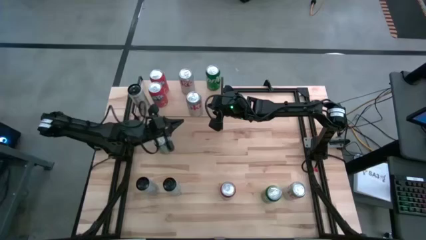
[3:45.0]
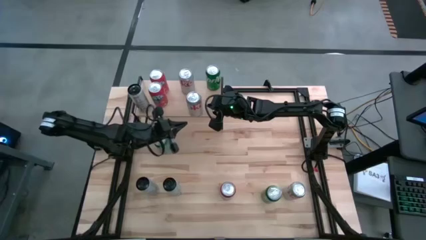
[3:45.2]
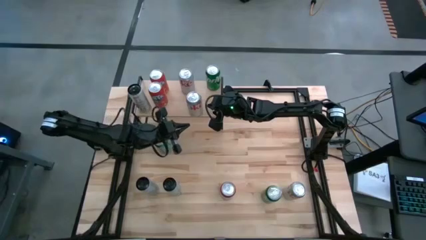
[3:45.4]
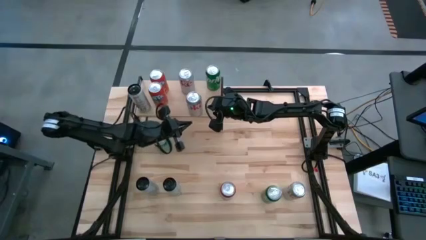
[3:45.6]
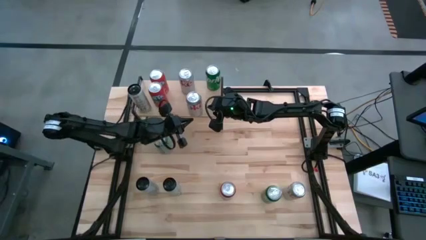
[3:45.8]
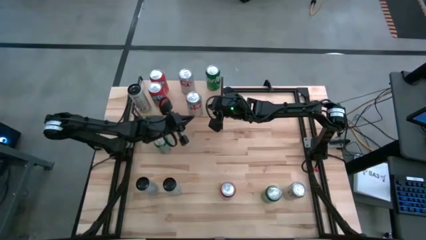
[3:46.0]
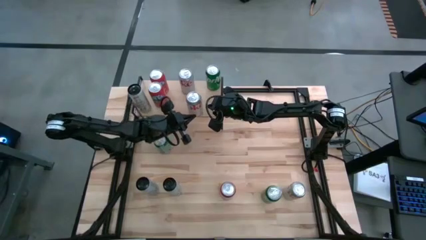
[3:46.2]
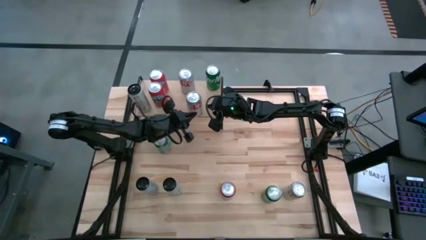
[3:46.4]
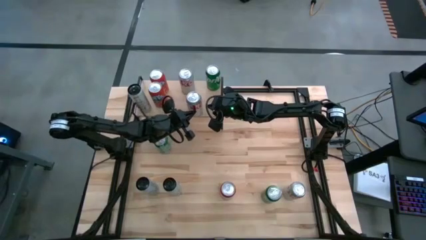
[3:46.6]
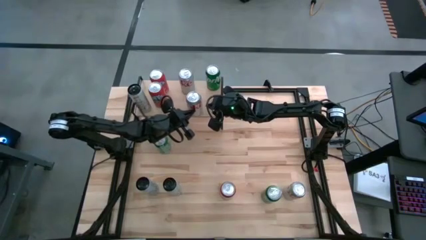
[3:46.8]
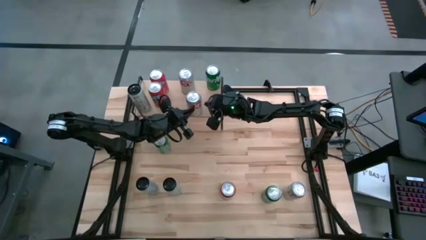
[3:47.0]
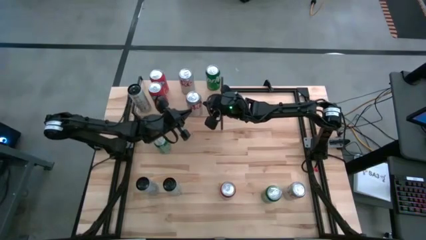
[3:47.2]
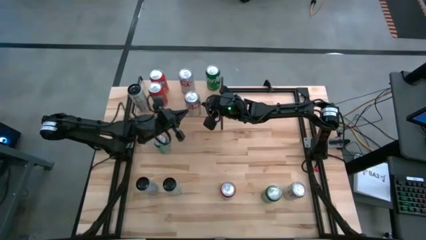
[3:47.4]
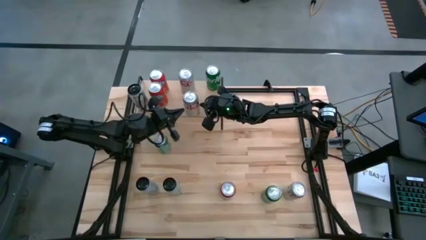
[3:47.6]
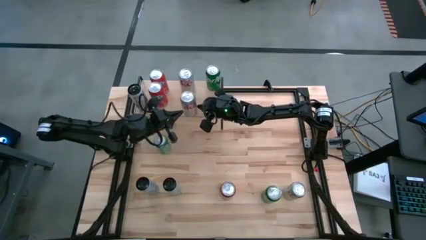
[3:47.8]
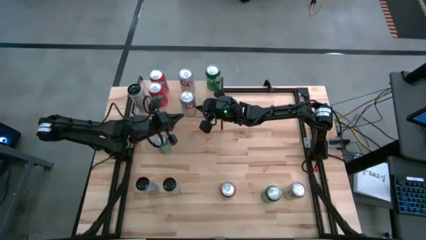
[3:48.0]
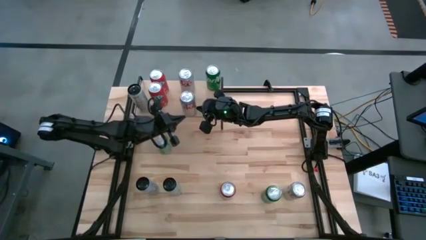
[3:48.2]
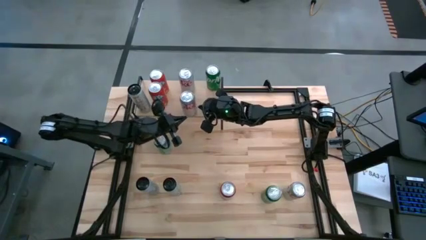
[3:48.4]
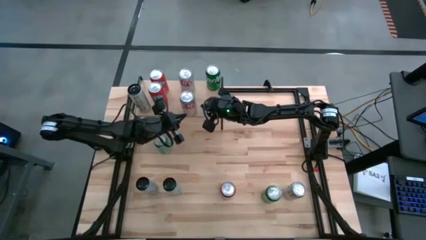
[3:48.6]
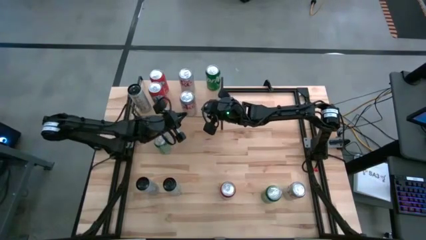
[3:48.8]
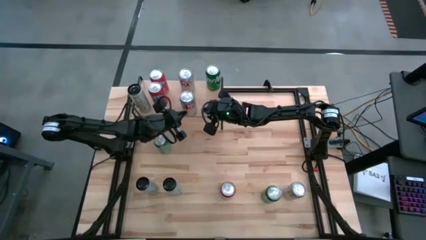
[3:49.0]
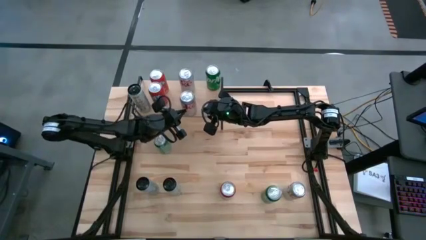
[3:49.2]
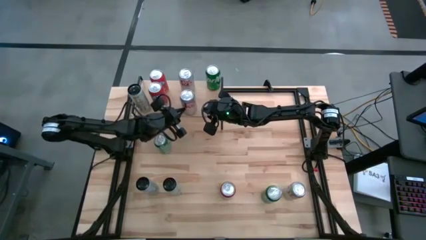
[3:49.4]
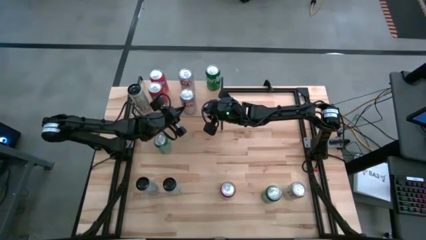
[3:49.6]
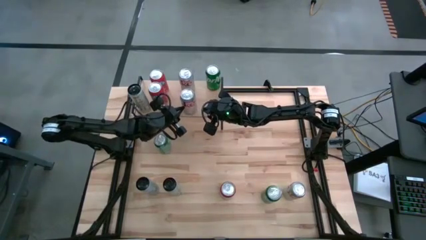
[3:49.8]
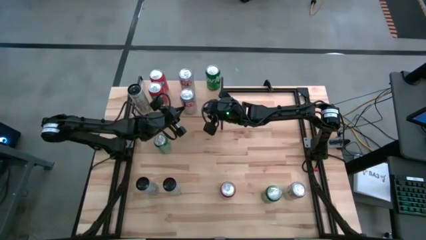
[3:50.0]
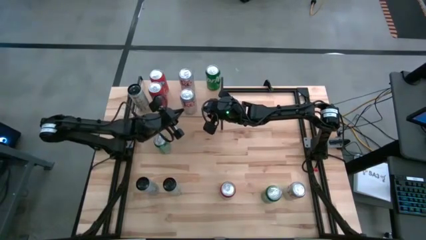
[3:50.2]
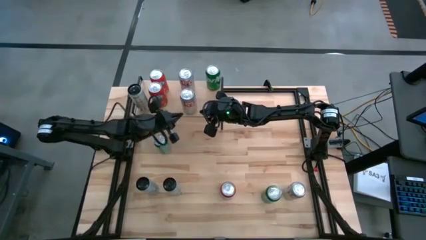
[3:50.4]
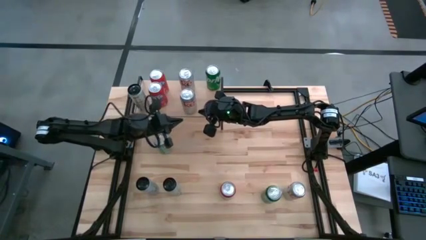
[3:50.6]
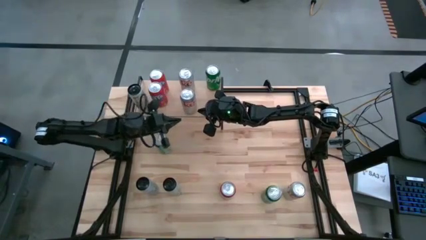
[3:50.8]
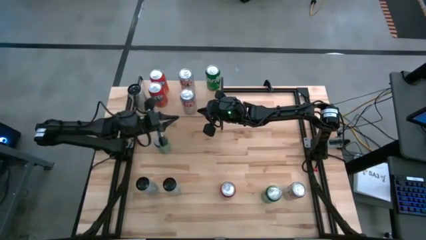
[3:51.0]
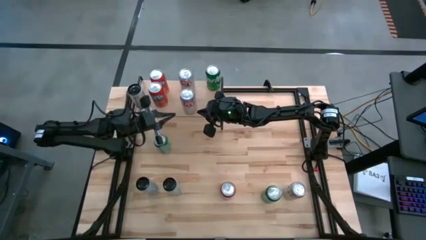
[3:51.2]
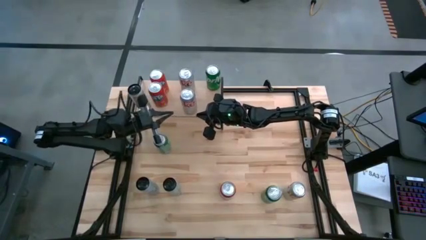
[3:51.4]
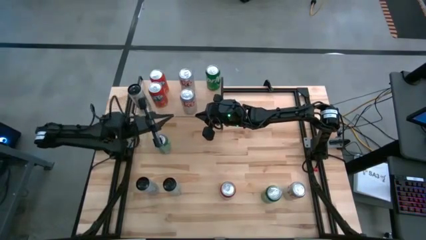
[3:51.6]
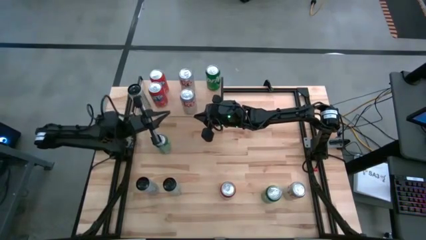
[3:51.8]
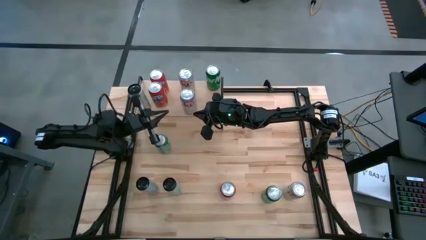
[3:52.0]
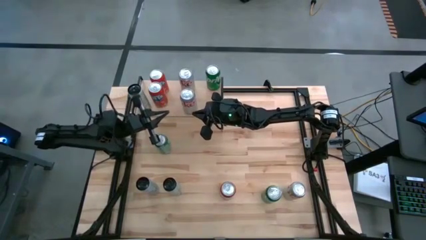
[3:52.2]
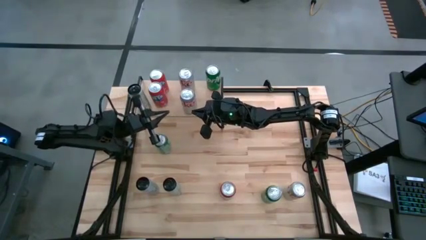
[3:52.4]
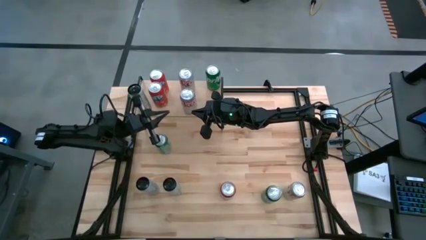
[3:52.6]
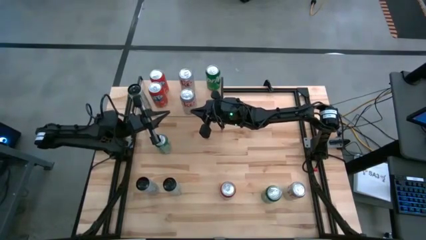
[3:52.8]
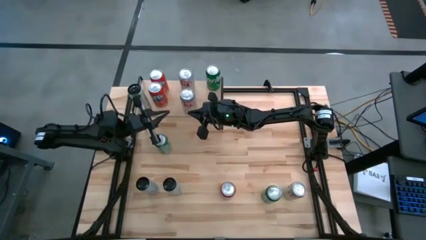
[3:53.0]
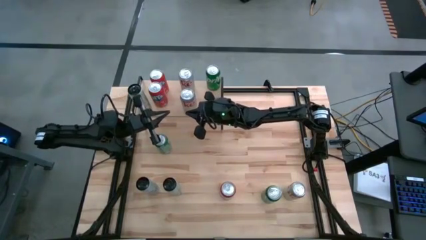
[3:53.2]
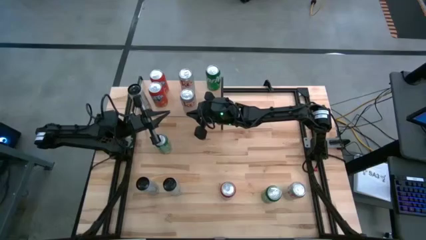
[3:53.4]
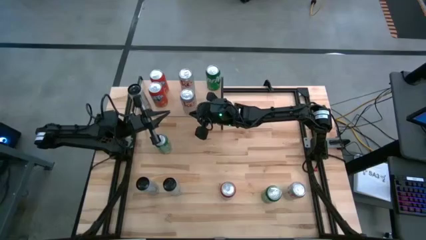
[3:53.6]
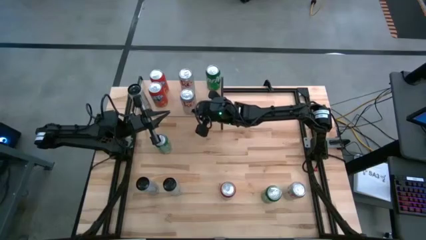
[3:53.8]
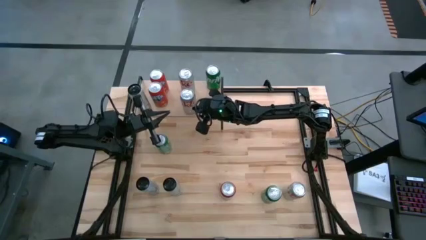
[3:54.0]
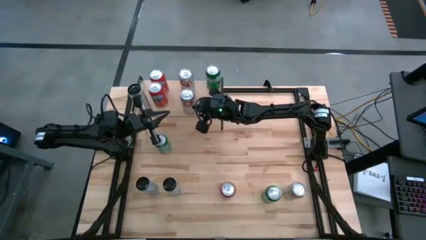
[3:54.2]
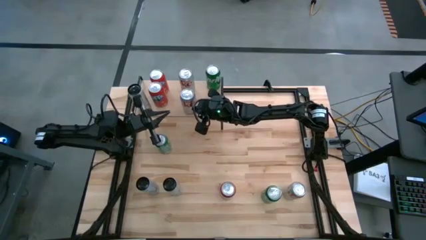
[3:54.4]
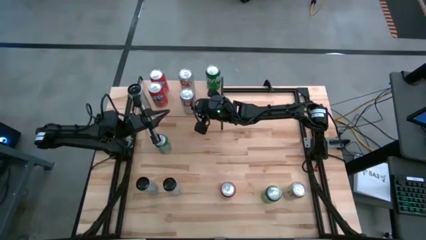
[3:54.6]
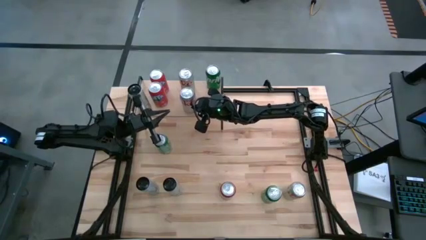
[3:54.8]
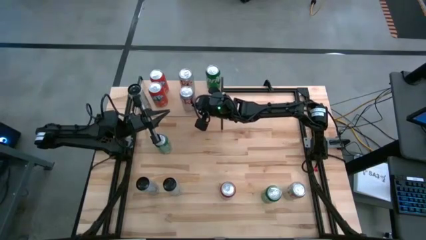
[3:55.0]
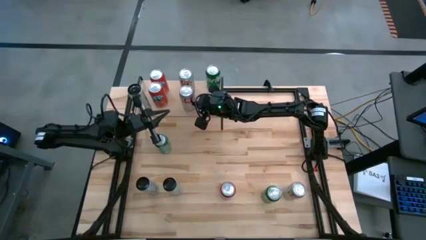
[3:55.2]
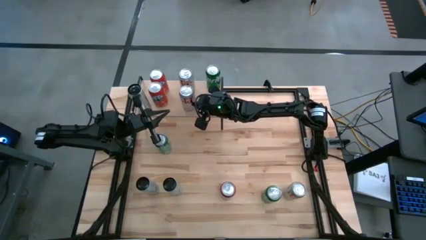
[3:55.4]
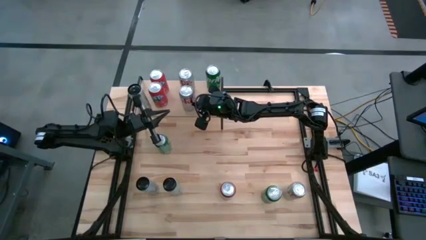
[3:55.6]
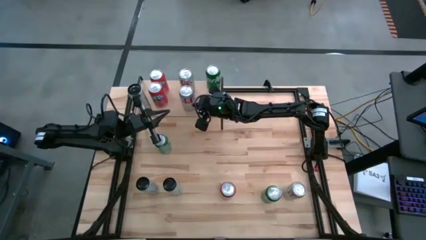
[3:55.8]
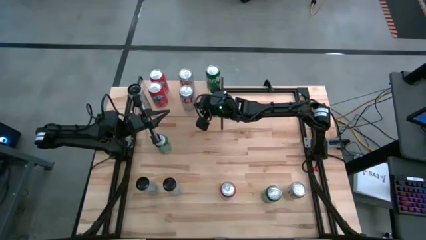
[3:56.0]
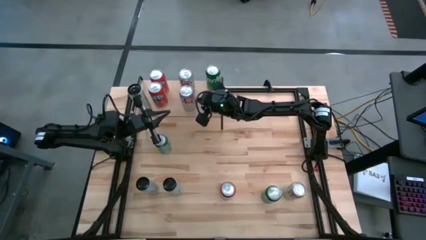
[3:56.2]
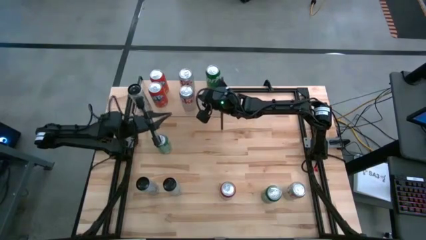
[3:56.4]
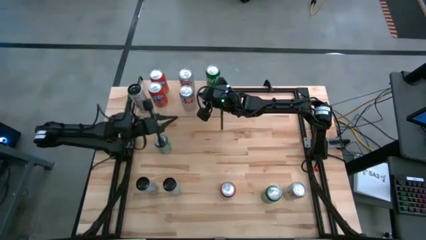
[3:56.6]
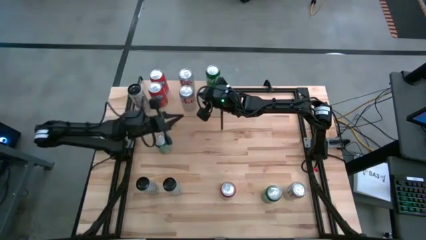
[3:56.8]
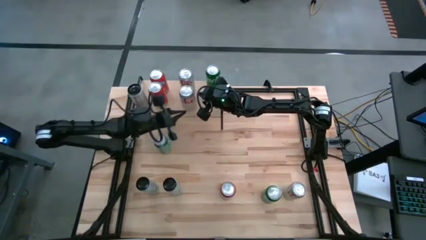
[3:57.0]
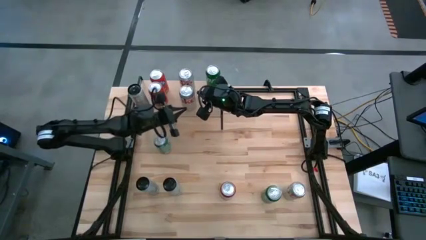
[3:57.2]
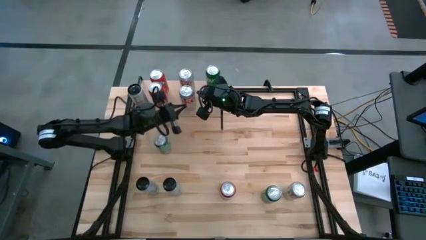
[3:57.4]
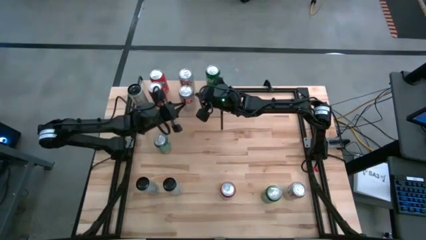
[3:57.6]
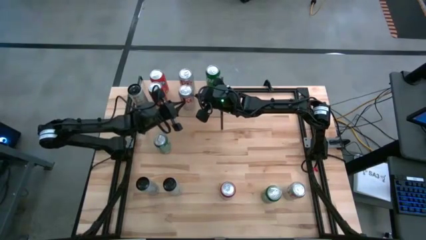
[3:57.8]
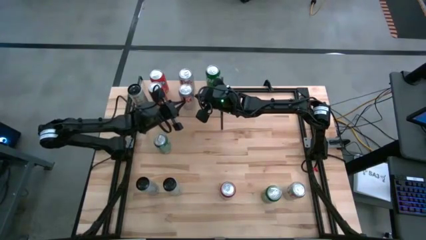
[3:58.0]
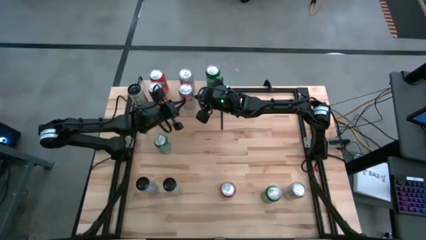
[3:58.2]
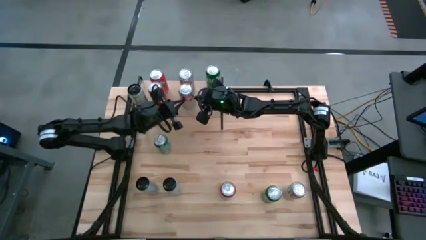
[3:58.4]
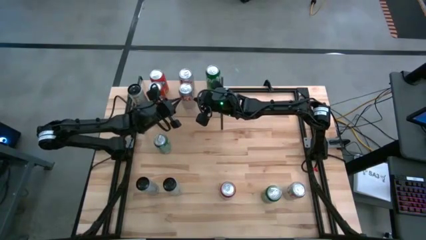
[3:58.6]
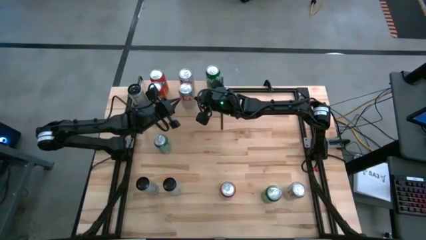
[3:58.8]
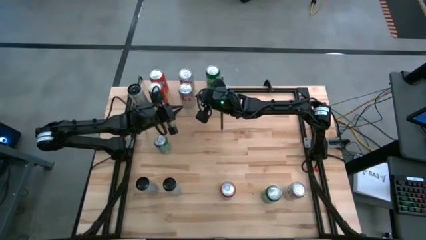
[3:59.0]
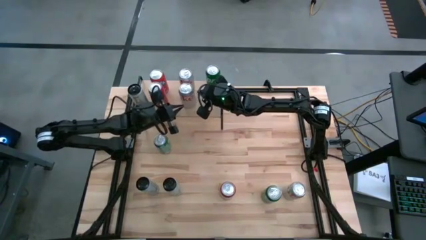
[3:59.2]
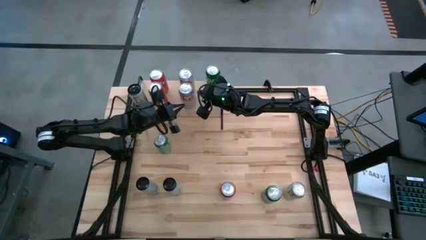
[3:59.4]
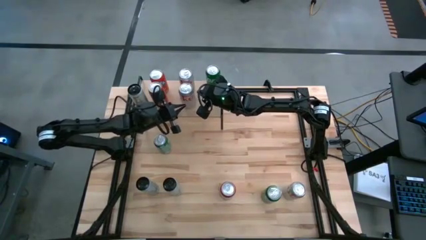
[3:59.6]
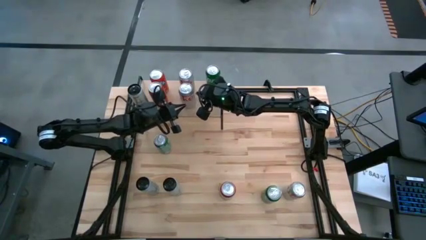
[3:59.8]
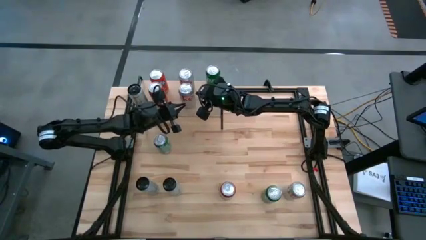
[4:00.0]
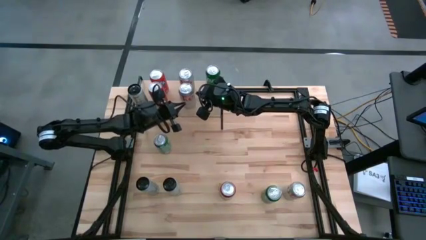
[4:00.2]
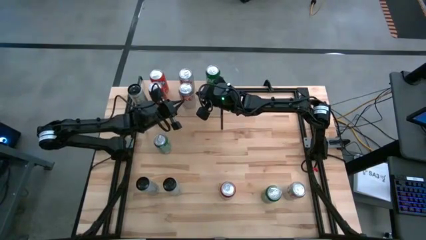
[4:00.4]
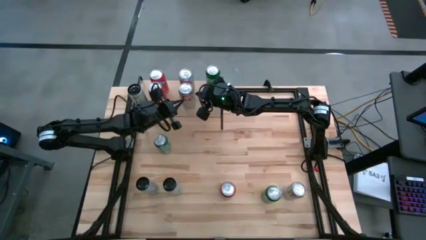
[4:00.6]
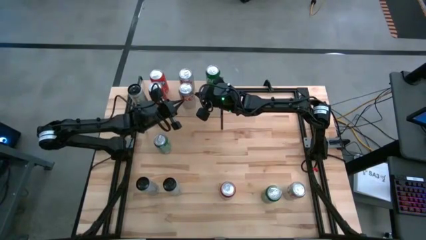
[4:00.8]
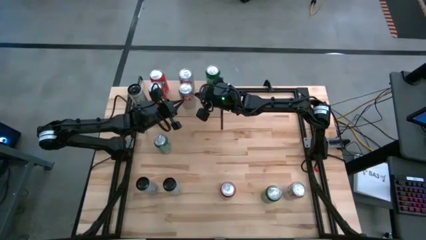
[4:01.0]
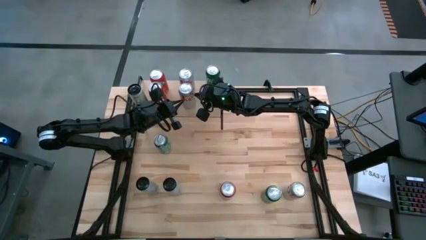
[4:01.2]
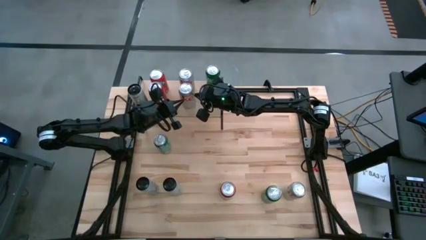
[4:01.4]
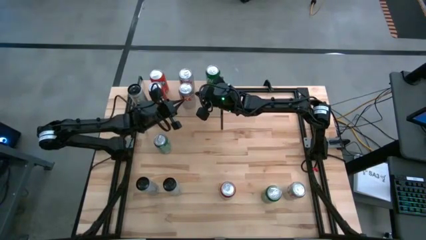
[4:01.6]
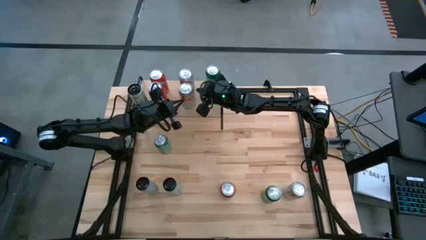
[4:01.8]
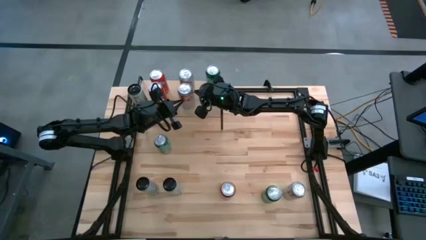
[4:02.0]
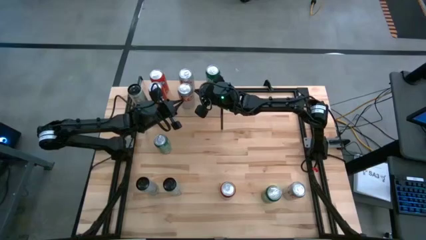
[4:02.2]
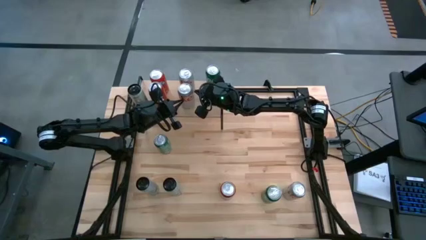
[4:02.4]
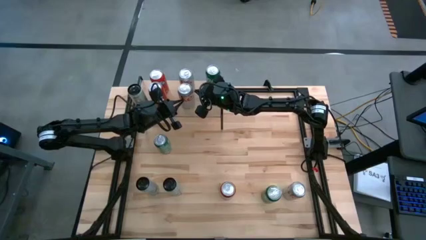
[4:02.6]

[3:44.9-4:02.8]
Task: Place canned beverage on shelf
Put the top silver soda can aligned with the other silver soda can on the shelf
